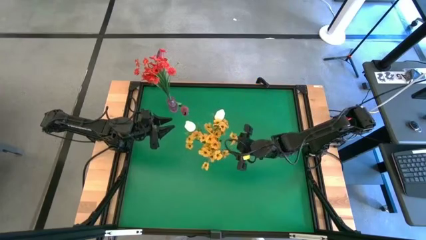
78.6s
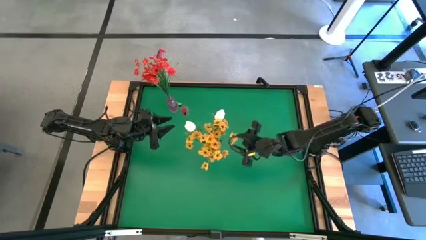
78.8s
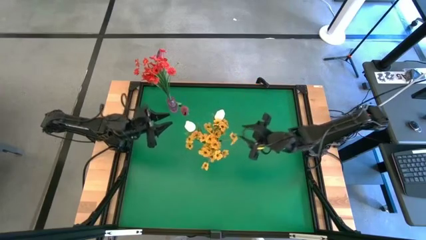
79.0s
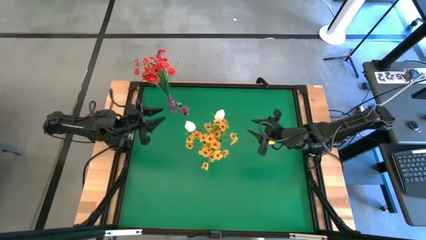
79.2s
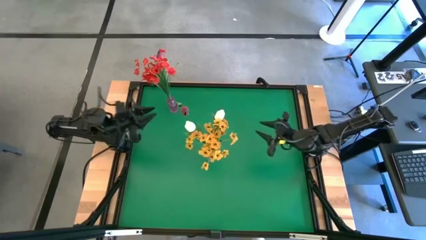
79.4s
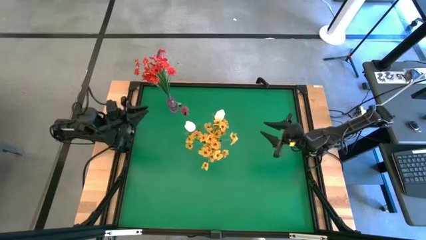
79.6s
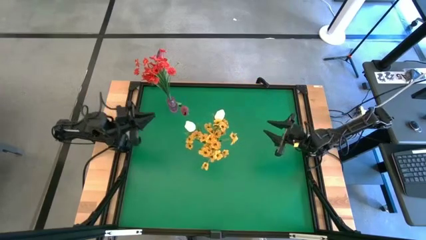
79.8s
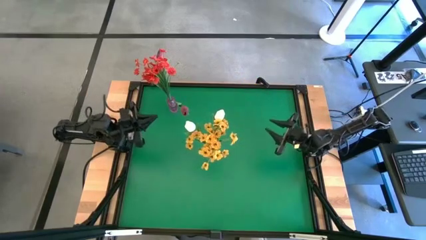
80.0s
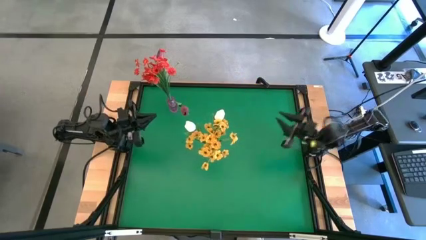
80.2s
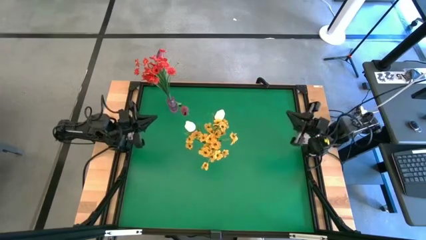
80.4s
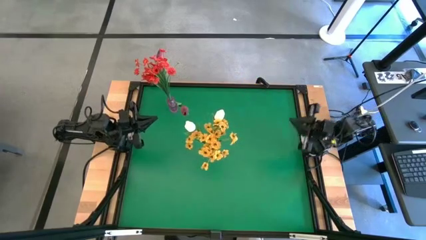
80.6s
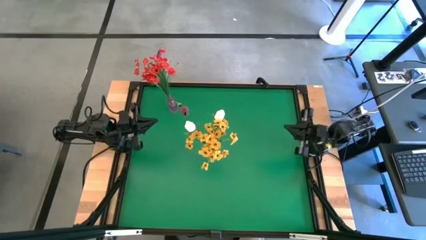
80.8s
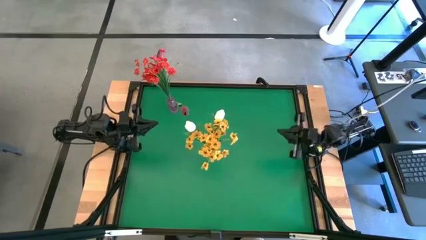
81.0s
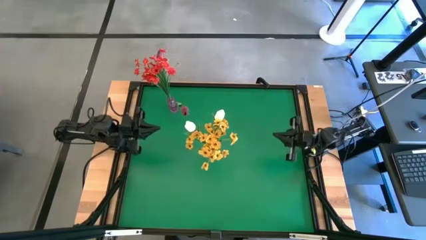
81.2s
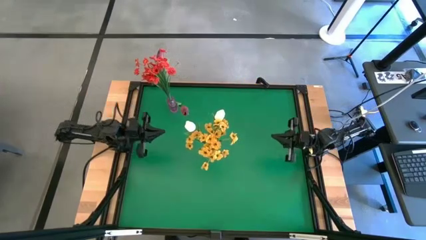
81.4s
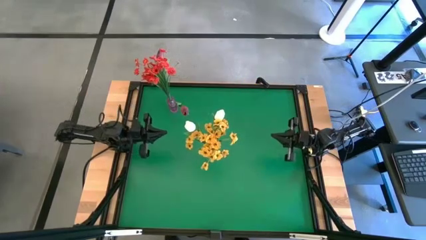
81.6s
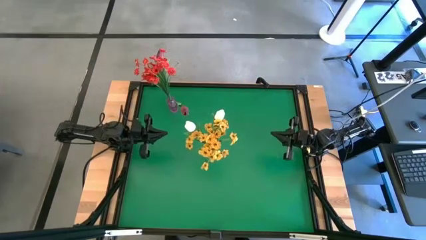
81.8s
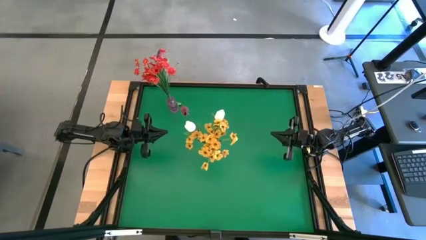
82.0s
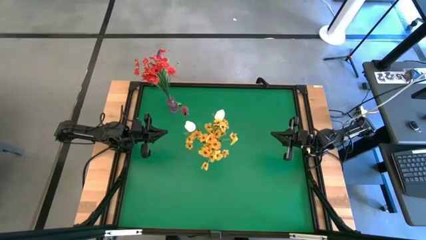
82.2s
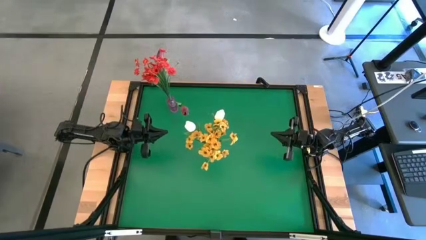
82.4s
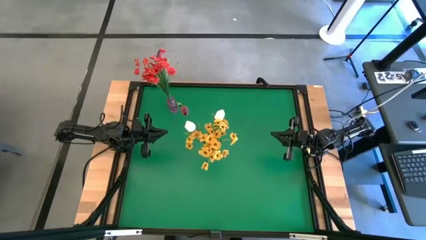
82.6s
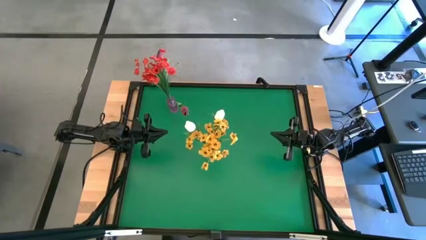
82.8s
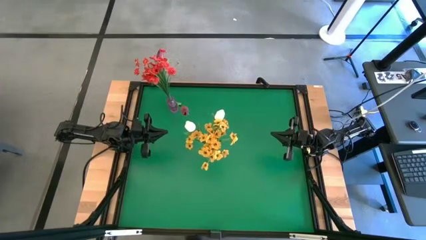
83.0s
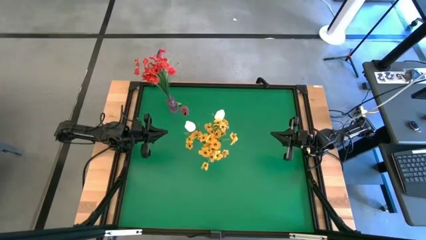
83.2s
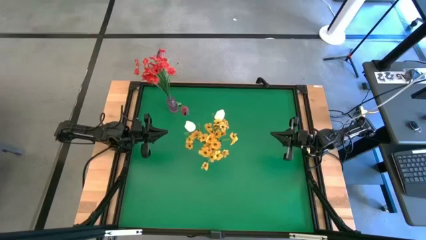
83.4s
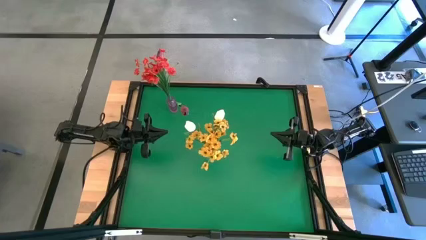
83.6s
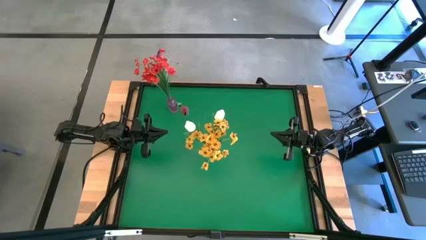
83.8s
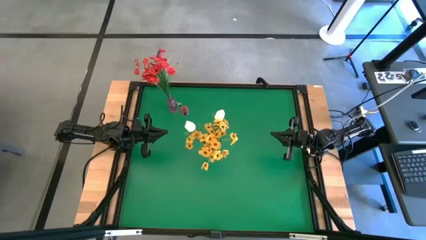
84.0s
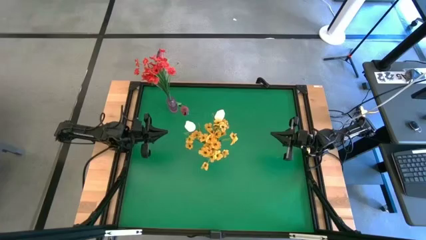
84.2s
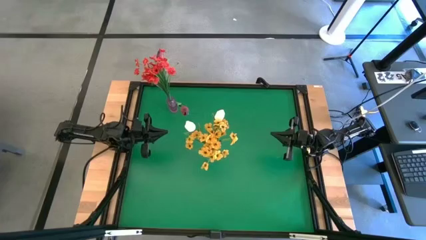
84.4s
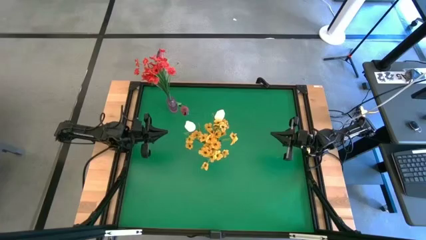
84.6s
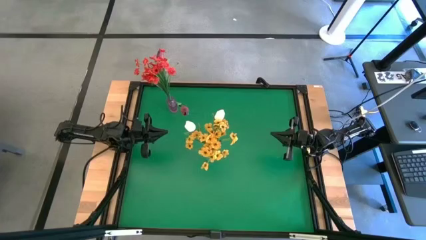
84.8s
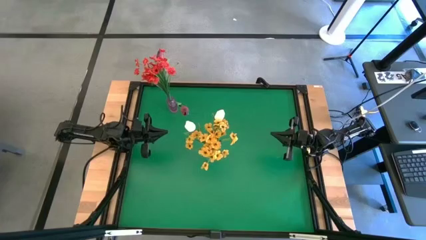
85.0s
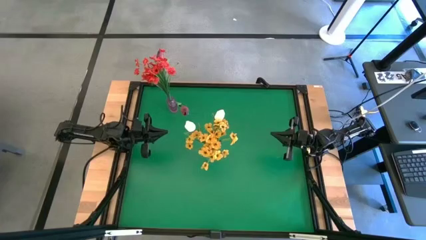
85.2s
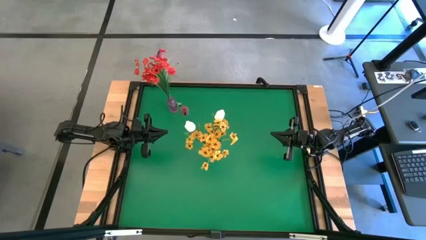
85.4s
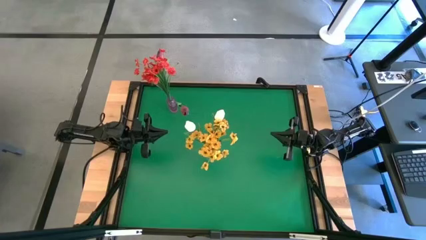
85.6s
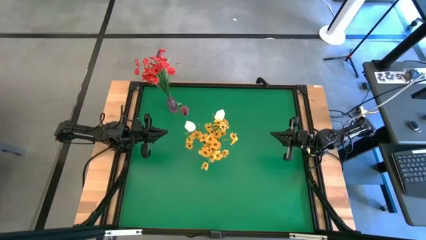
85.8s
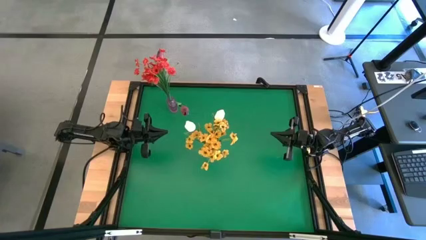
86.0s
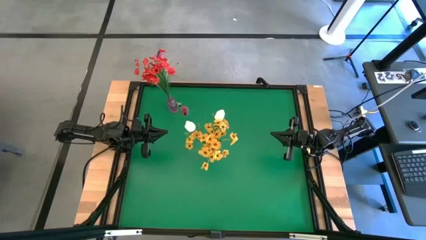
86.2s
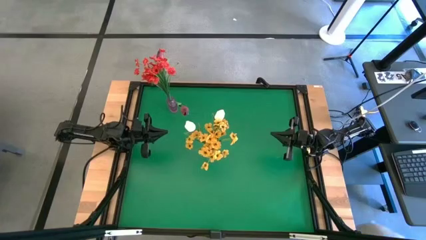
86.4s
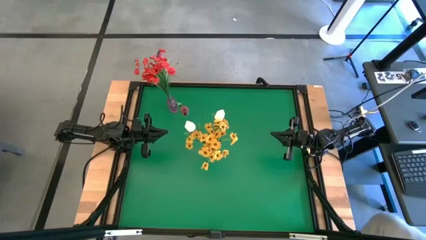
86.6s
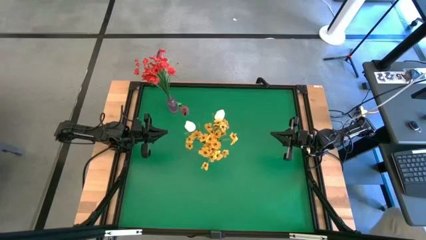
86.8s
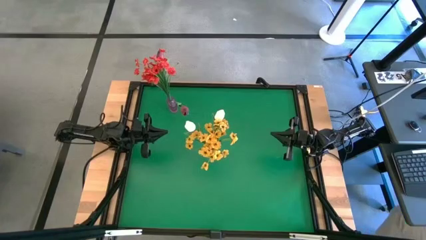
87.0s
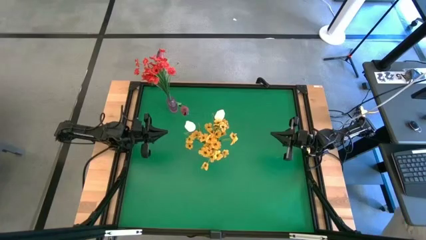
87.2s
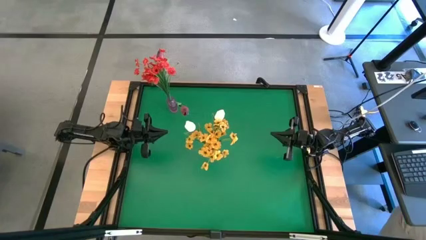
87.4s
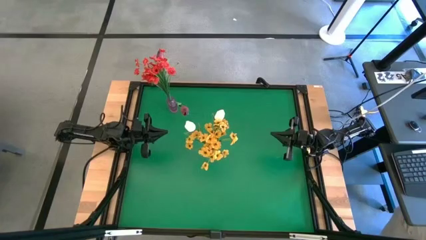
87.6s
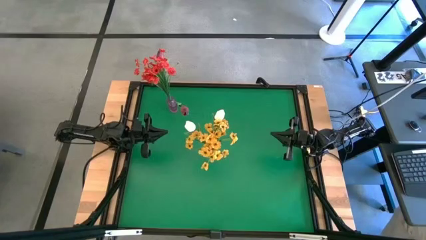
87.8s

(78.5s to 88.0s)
Task: Sort flowers into vase by color
Return to Home Position

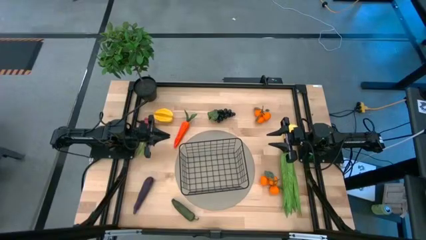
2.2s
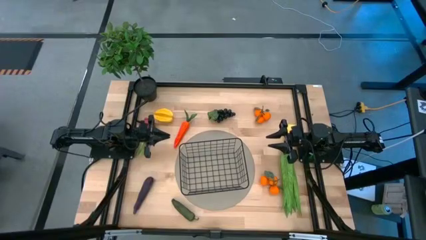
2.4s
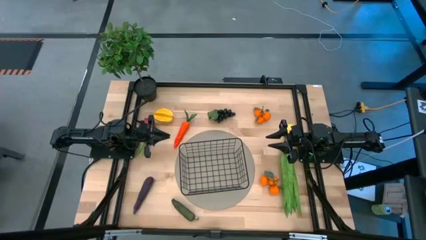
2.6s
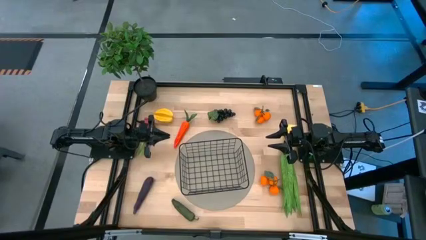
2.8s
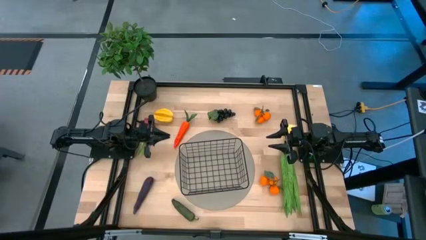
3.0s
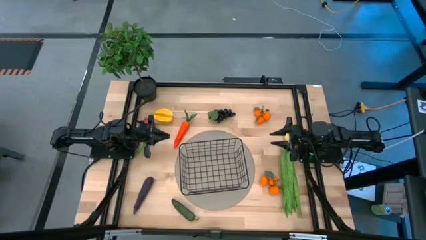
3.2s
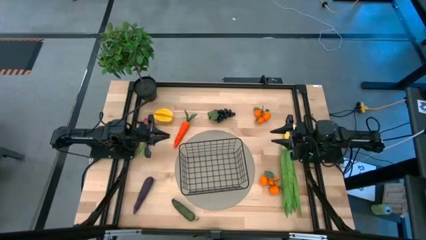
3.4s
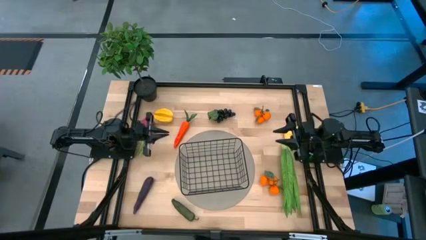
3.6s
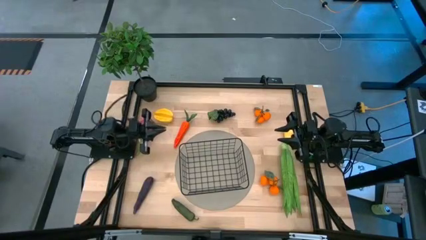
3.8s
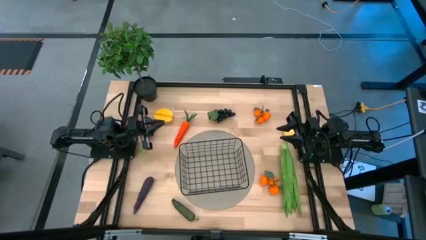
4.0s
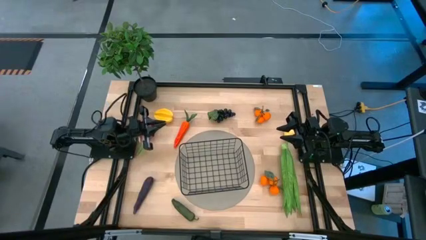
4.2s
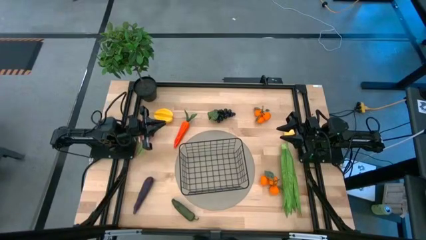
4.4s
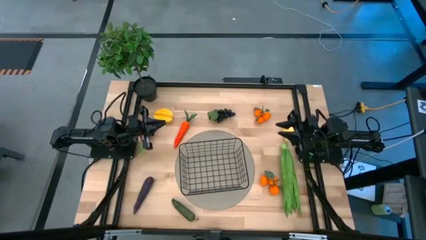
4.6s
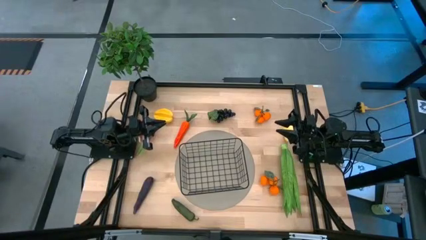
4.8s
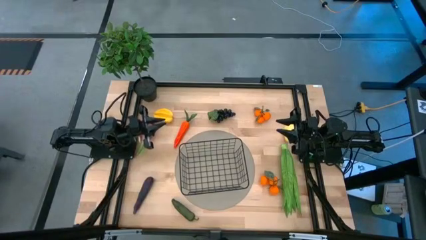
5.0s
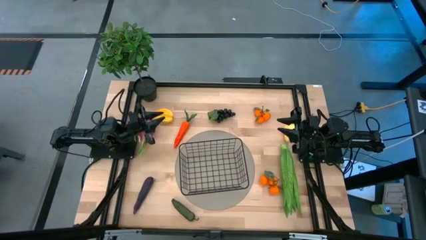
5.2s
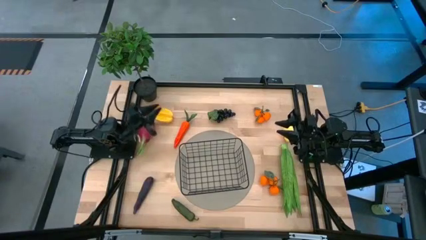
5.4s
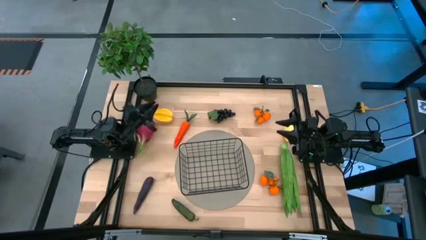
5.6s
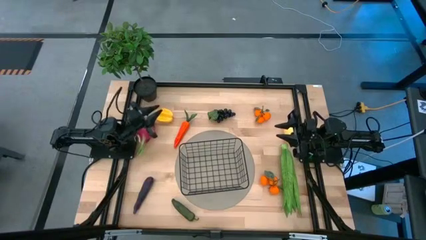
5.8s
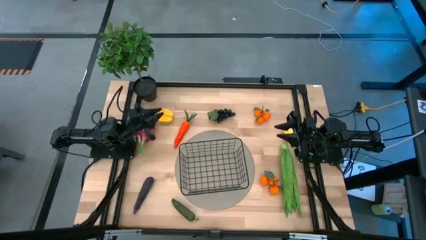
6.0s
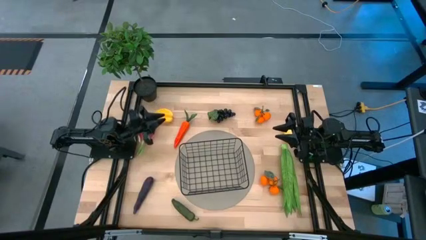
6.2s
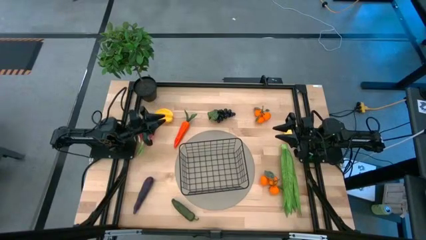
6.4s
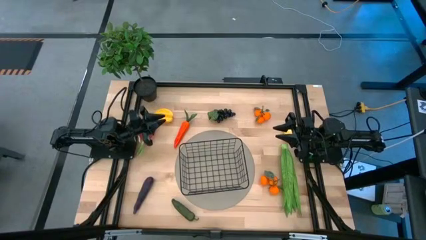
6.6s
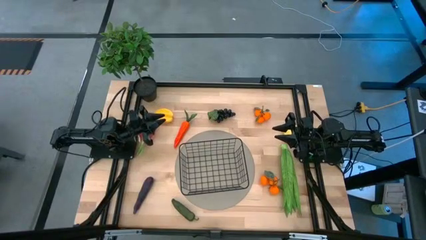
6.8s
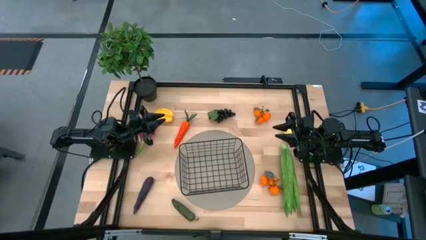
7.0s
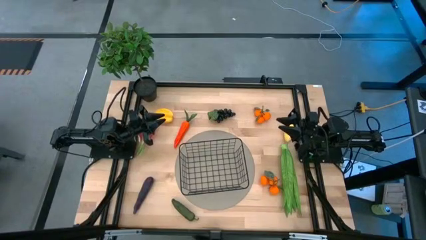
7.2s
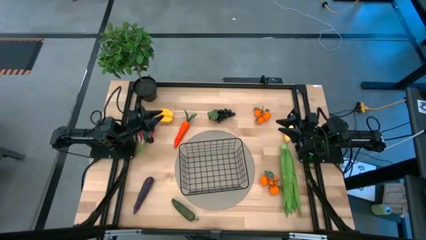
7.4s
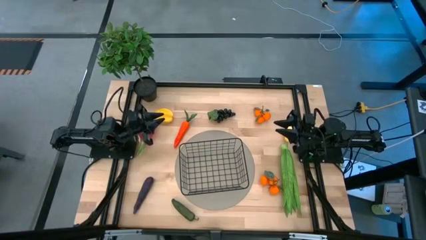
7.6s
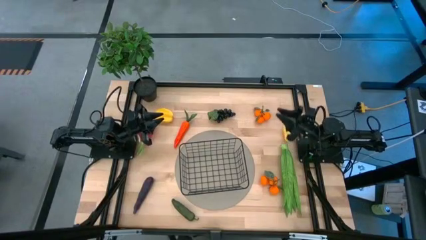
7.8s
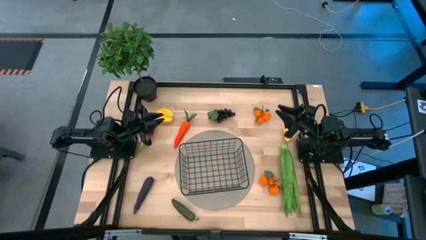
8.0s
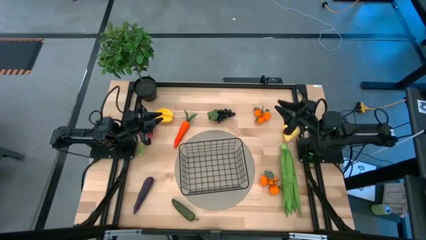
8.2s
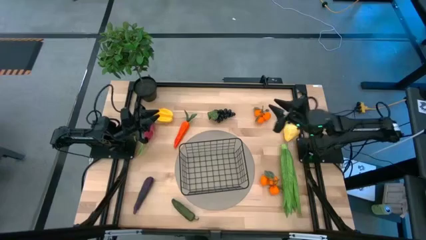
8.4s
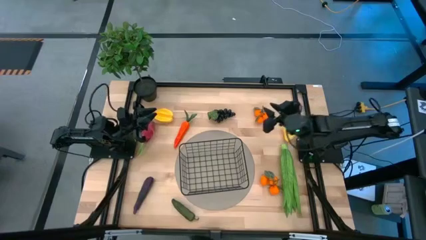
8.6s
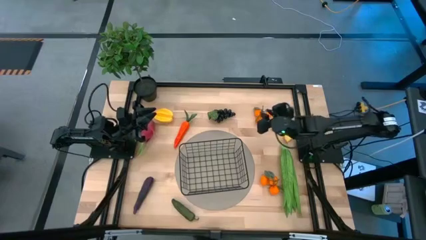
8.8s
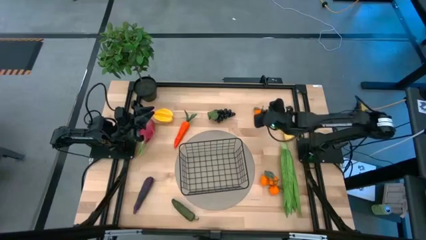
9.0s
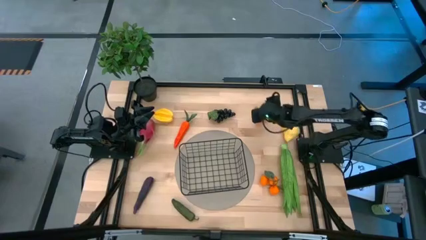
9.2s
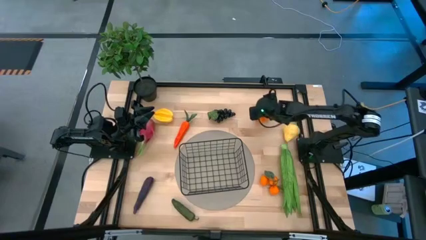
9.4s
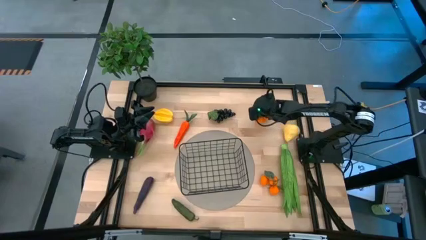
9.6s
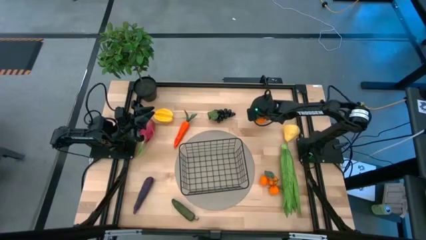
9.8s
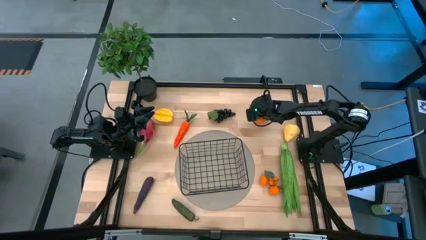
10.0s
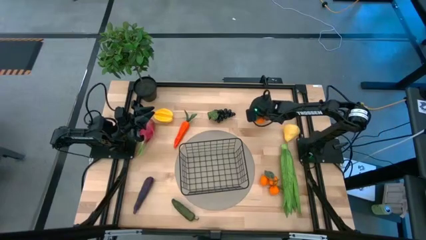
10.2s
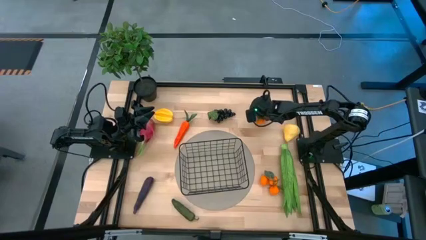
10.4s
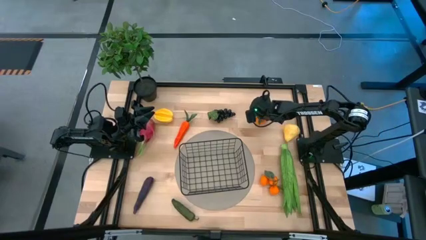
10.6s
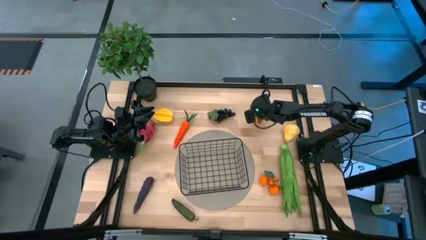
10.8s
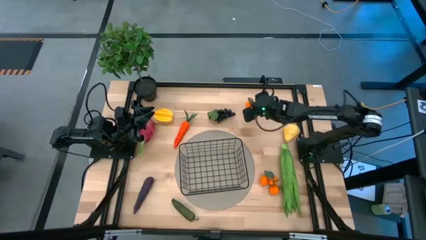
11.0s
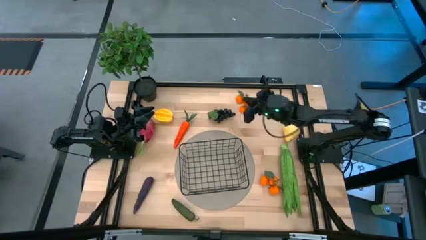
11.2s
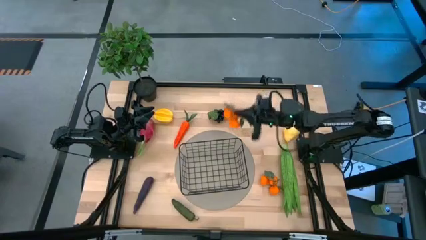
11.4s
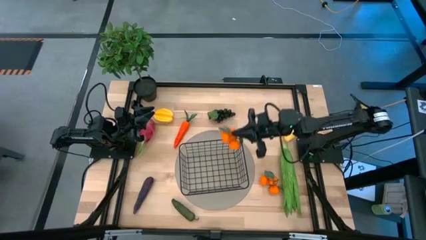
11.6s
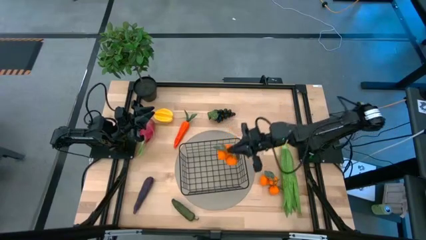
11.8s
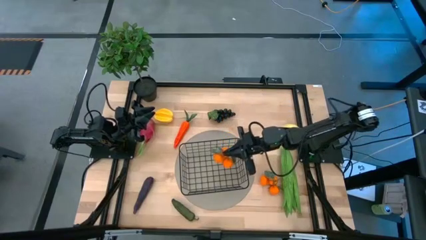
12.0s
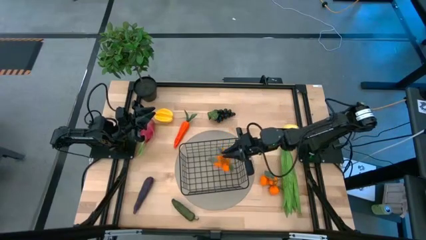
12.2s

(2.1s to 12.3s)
Task: Build produce basket
Put the top tangerine into the black basket
